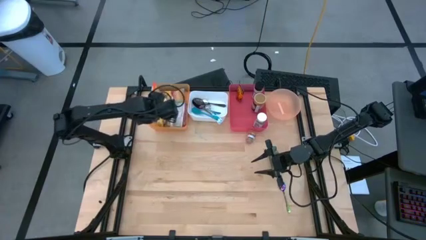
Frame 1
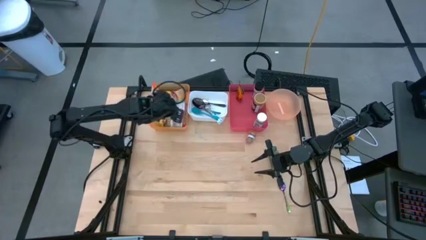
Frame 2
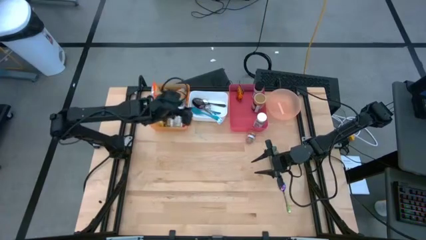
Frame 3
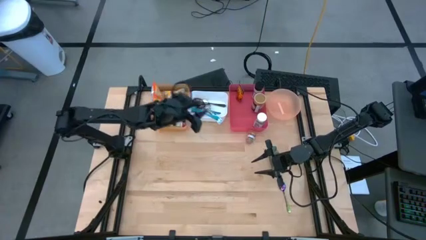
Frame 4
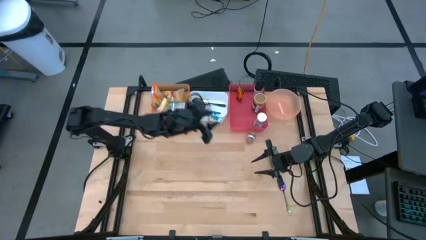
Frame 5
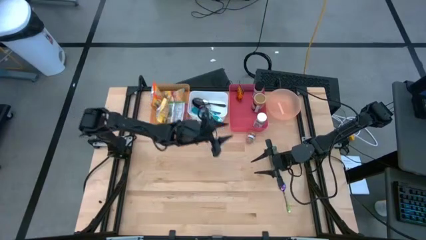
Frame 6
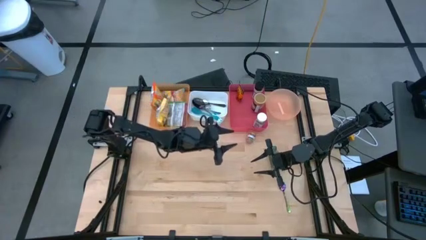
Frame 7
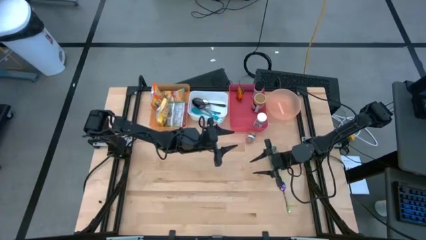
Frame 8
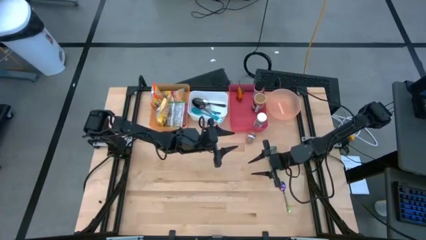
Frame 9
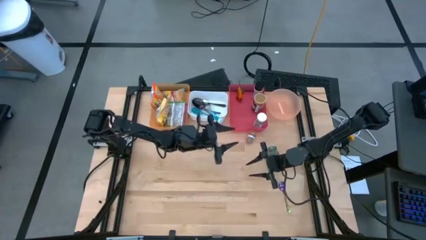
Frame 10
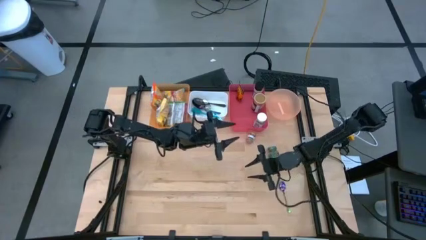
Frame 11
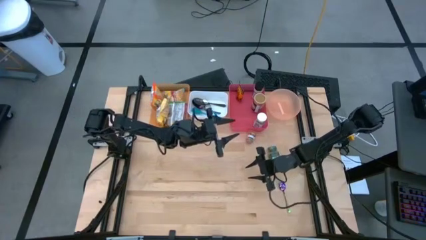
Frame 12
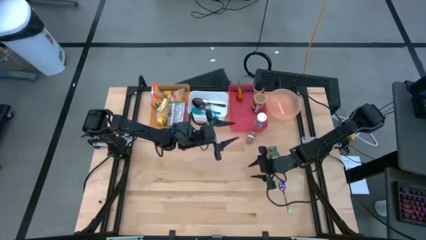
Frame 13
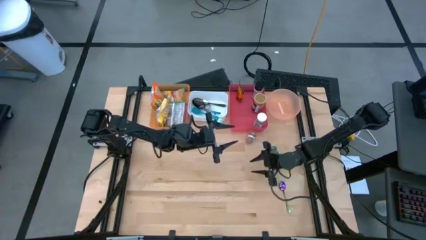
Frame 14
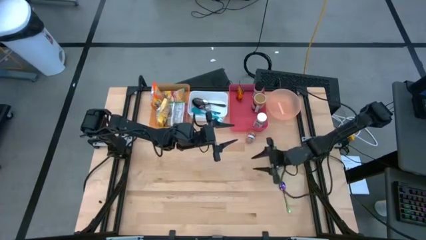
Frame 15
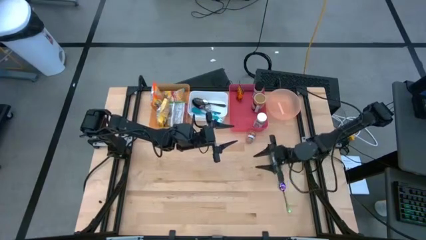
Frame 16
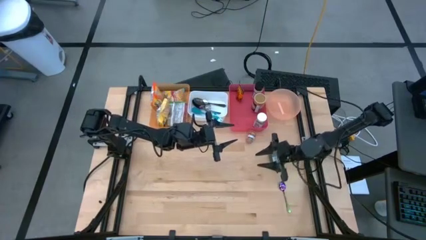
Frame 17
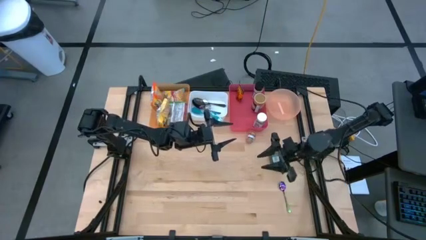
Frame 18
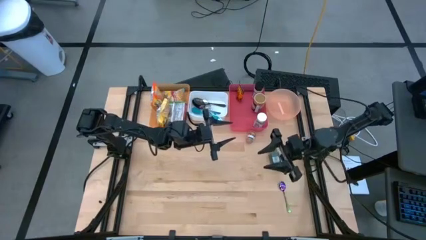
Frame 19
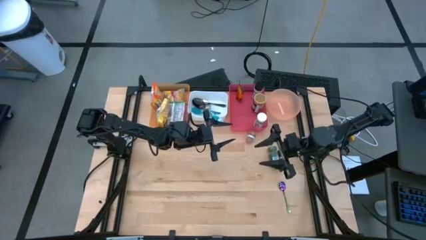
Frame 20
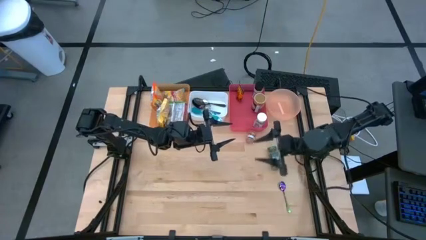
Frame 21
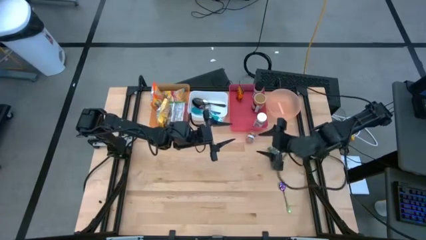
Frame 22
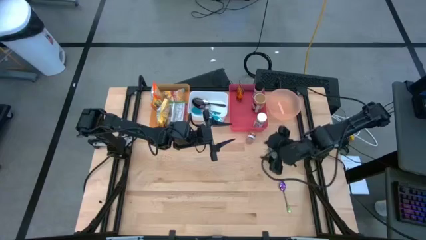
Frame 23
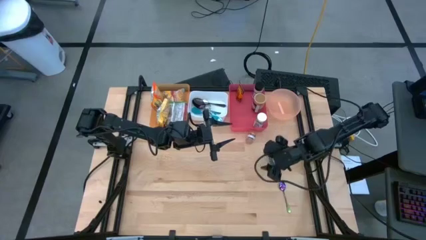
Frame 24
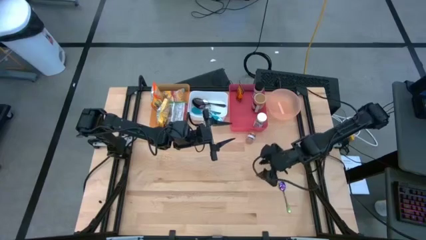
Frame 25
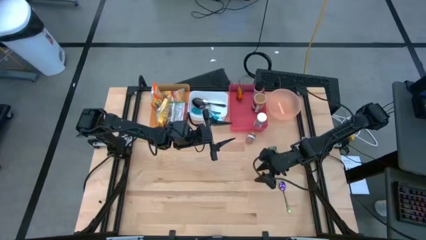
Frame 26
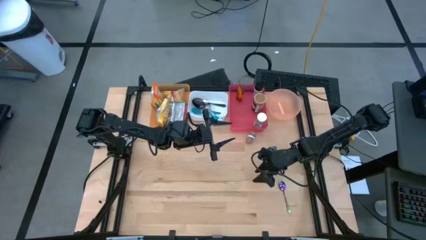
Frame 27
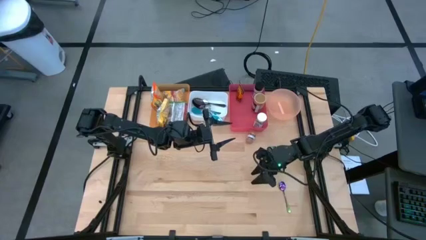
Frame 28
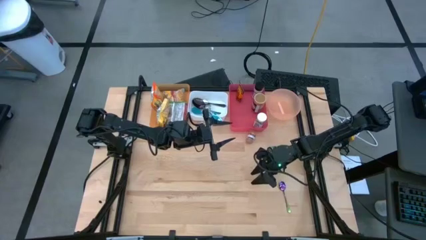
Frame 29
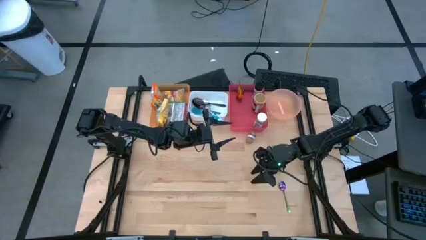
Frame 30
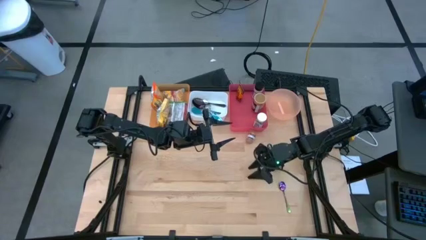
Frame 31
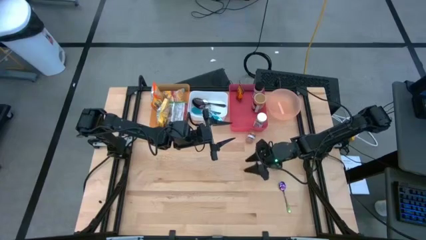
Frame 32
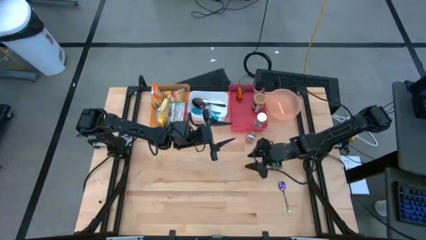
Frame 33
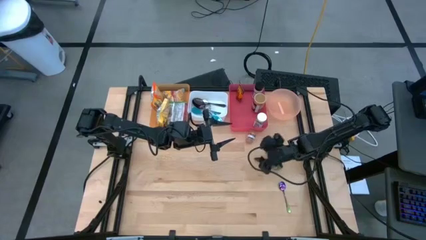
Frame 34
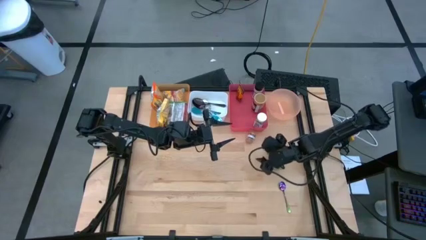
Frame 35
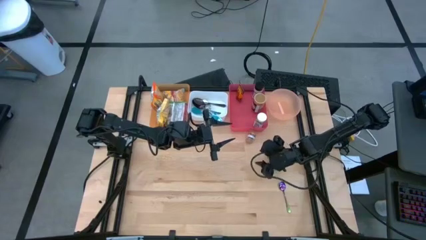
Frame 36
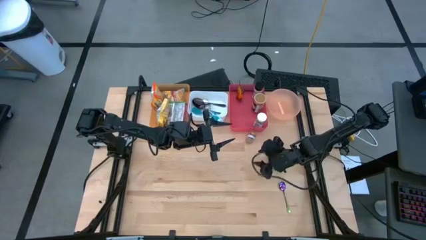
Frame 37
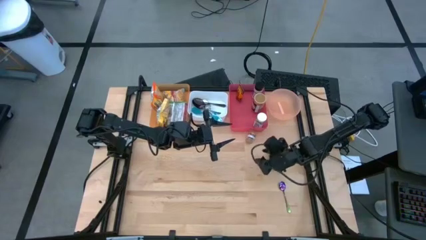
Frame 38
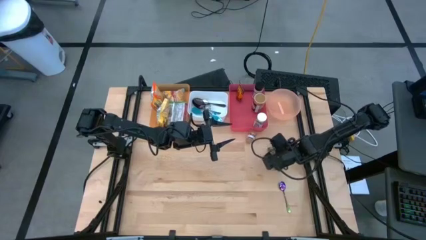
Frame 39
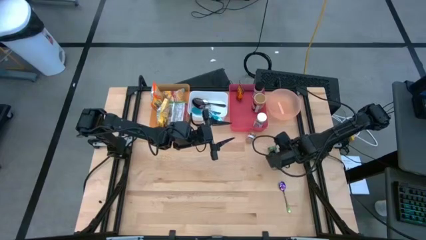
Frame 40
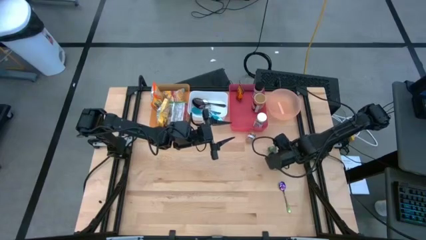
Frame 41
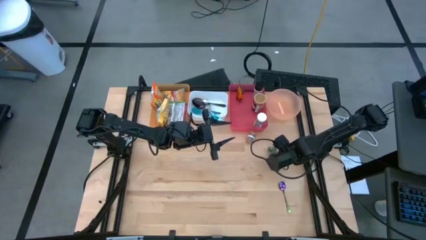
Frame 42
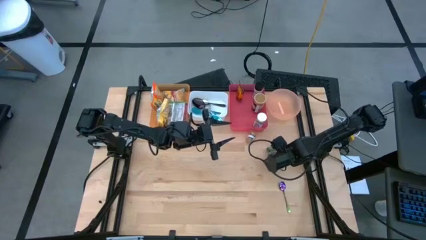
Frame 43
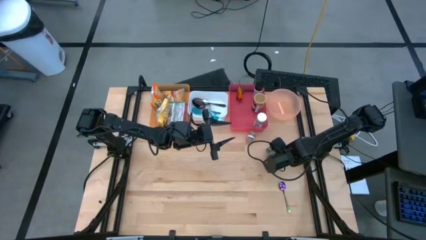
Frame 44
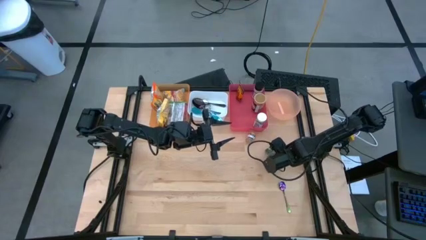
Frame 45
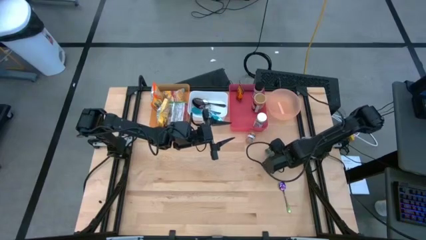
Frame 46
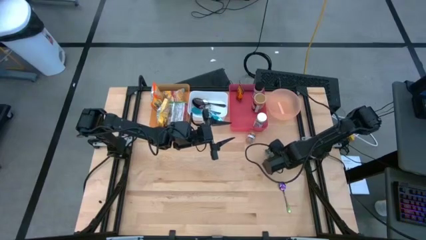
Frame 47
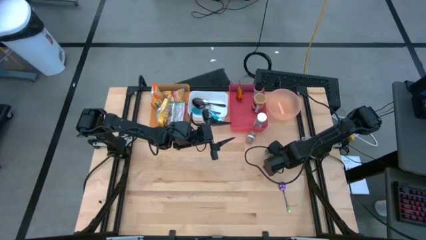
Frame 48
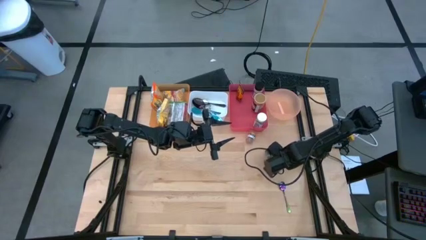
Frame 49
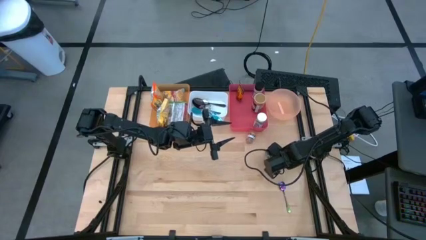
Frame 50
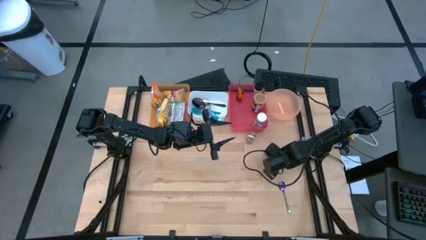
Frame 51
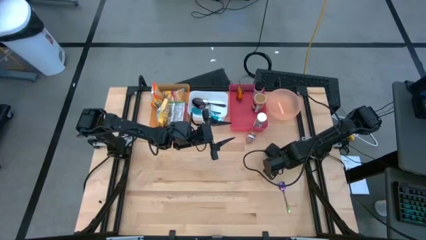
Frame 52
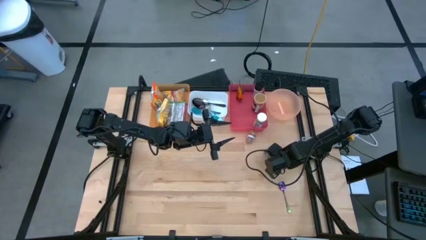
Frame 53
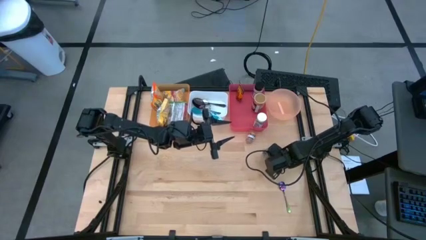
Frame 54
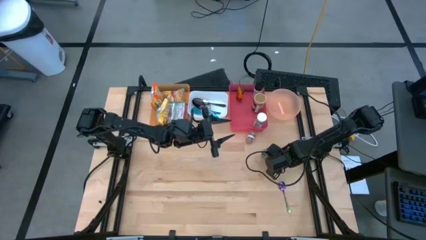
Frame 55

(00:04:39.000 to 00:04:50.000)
Task: Pick & Place Food Item
Put the green seasoning bottle into the red bin
